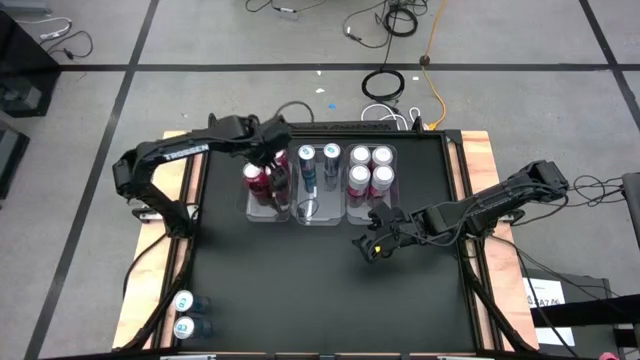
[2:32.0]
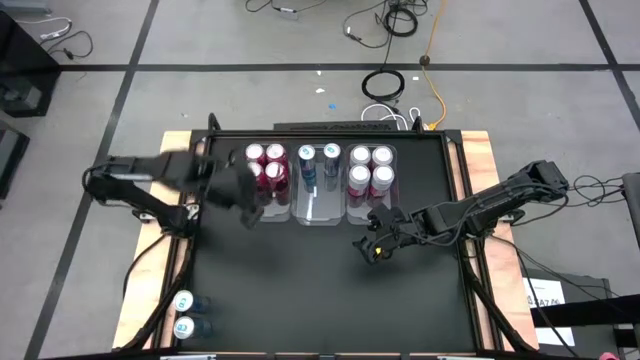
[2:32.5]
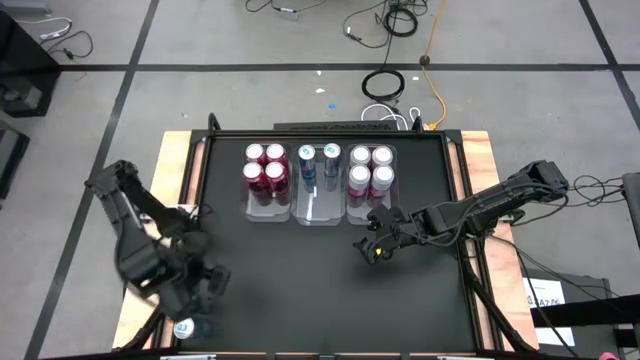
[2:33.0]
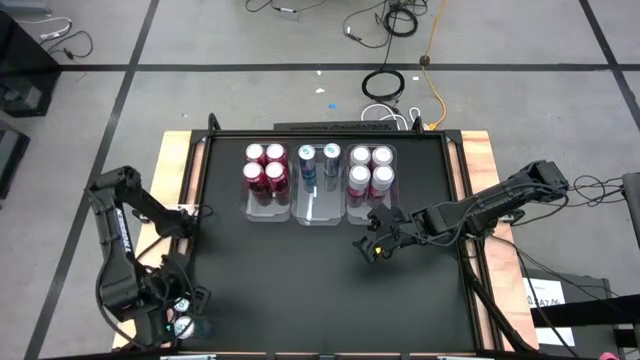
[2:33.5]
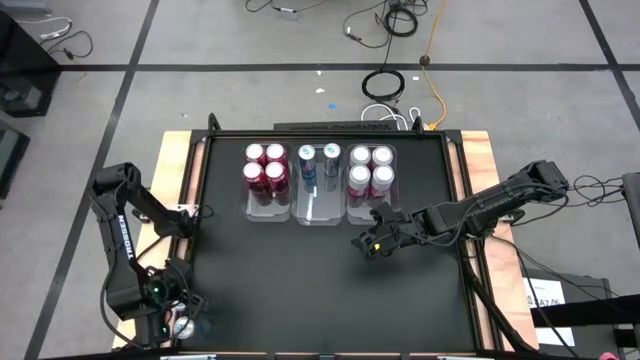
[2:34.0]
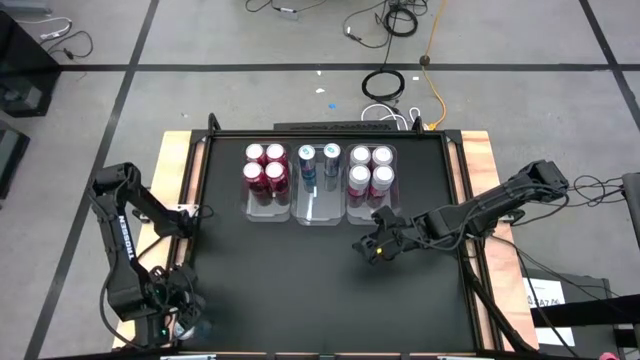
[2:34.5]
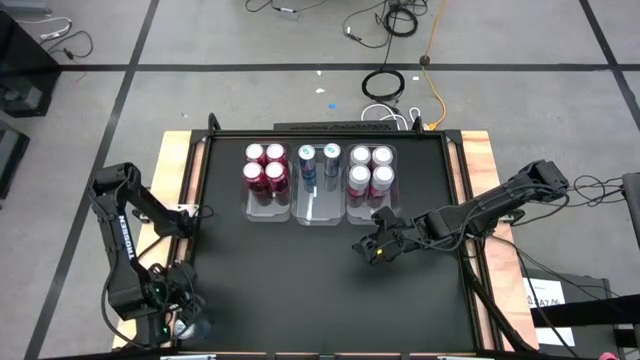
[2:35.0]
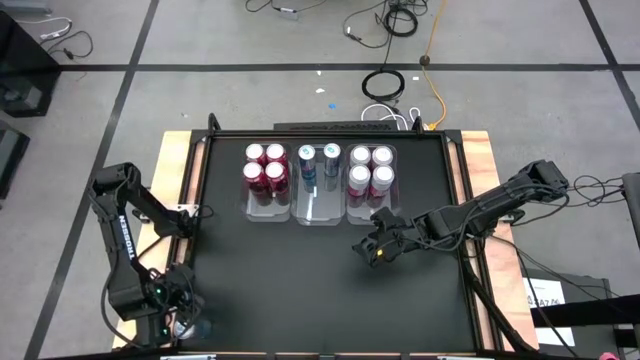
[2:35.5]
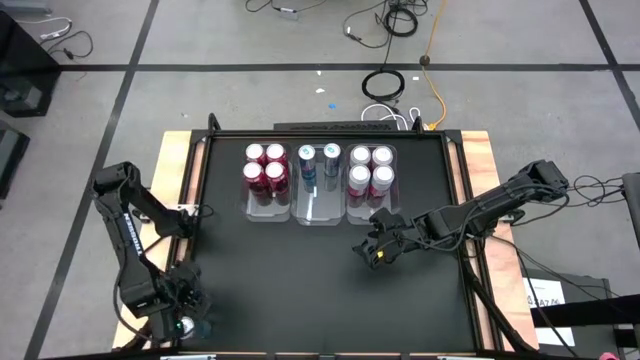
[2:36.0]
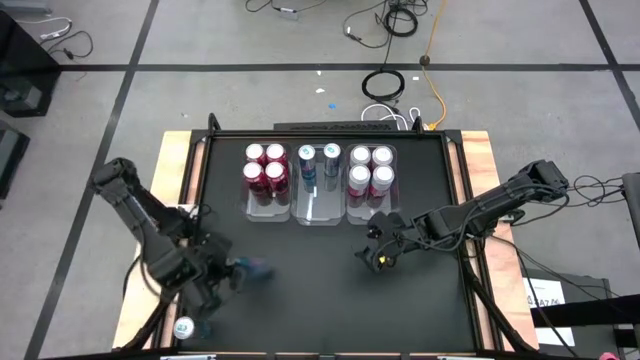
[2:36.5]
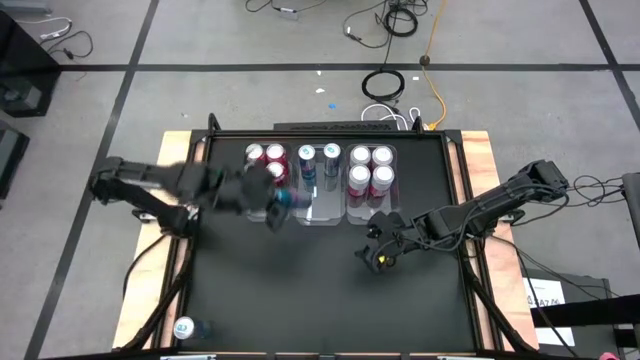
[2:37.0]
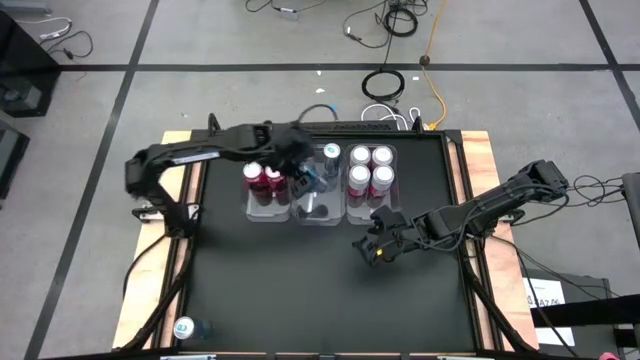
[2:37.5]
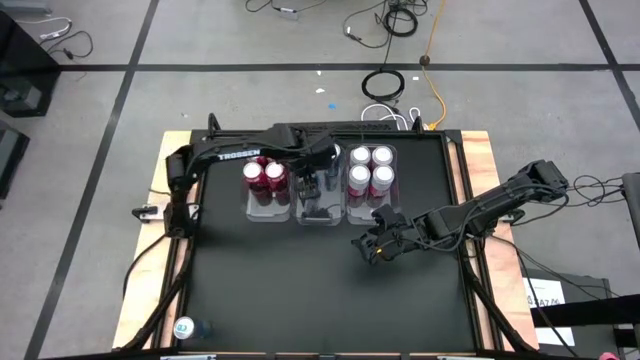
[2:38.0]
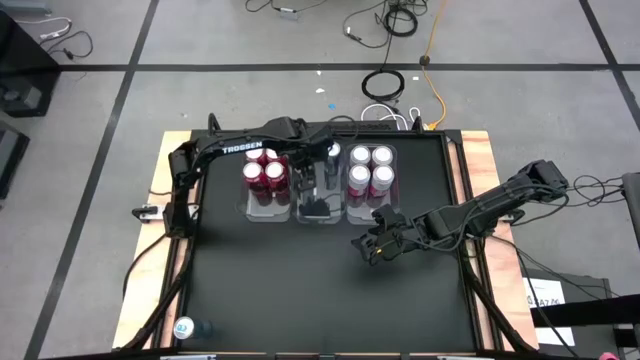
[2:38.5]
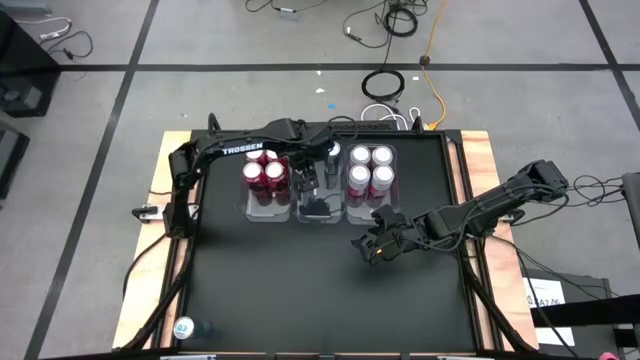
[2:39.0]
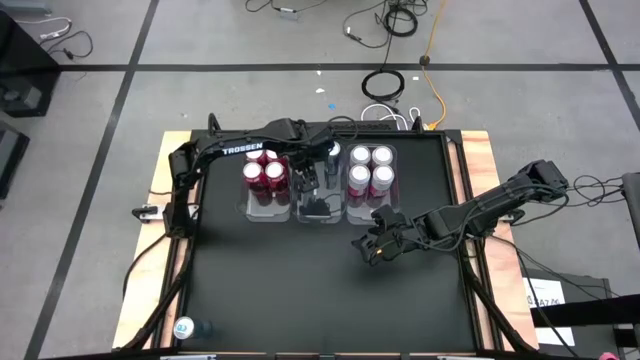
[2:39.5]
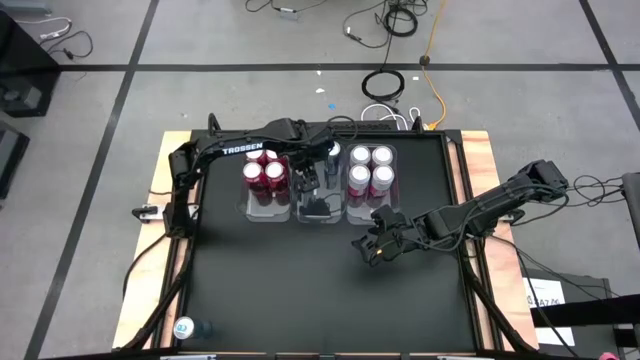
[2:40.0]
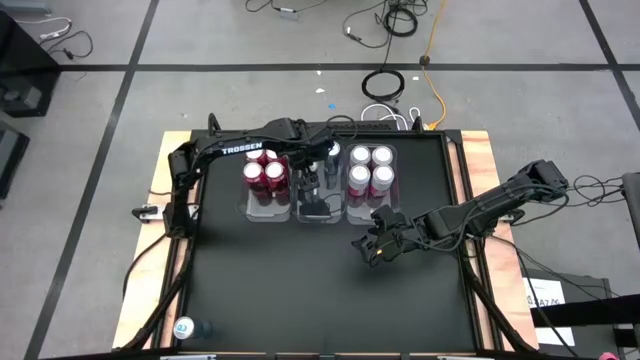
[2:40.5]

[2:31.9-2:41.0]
Task: Sort soda cans
Put the blue soda can into the center transparent bin

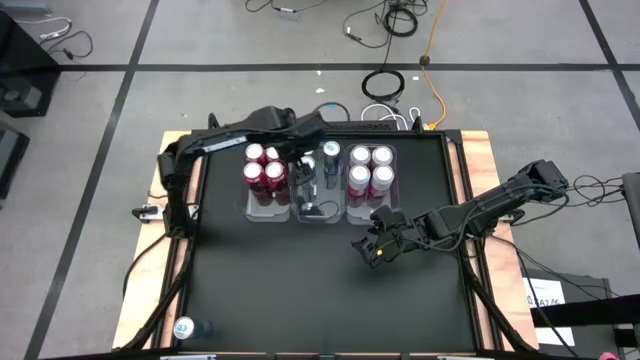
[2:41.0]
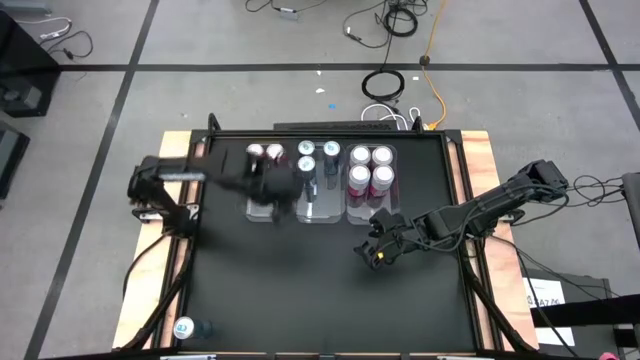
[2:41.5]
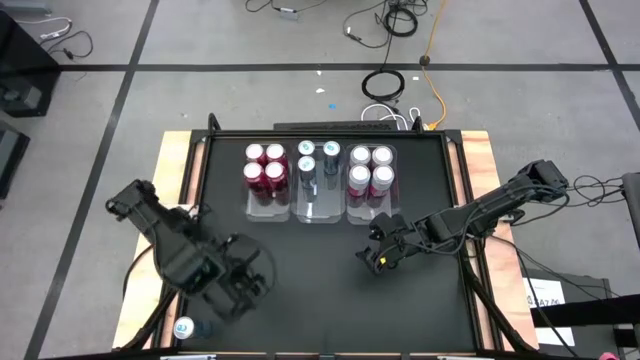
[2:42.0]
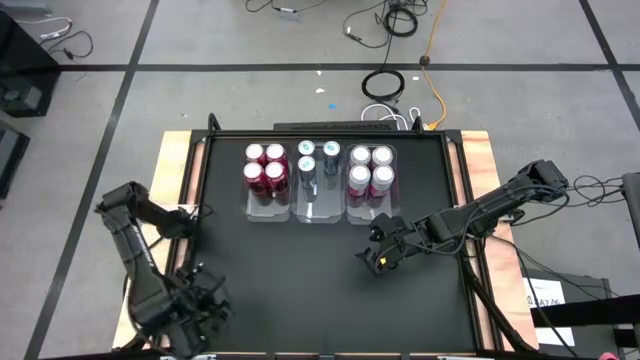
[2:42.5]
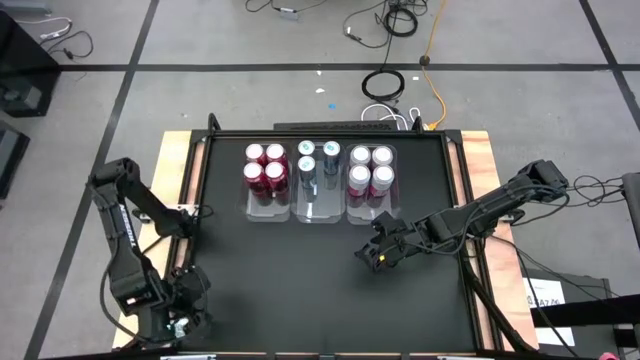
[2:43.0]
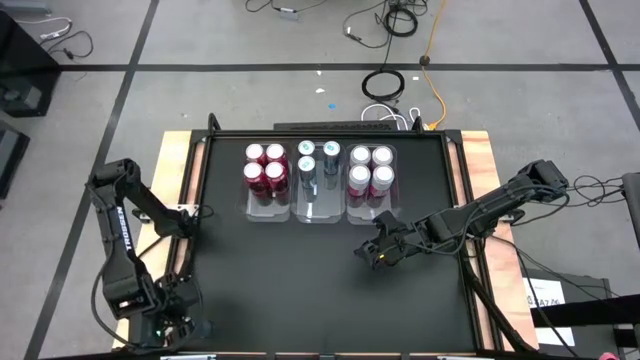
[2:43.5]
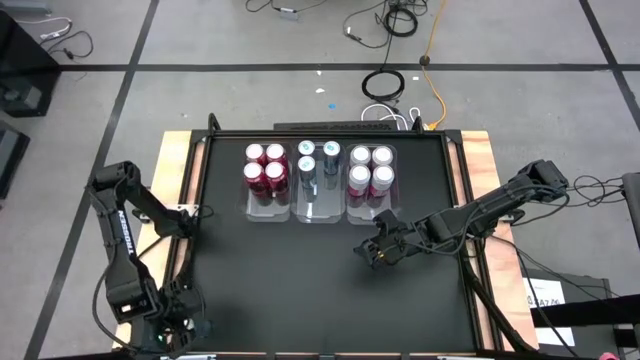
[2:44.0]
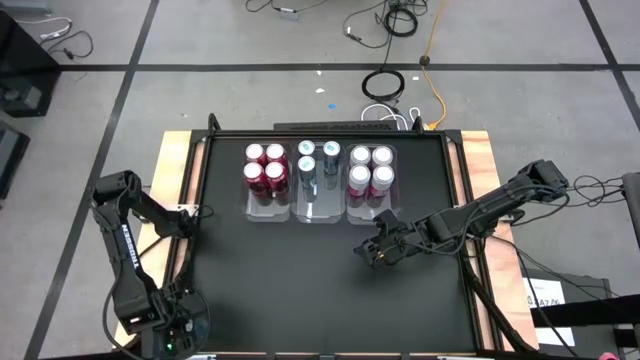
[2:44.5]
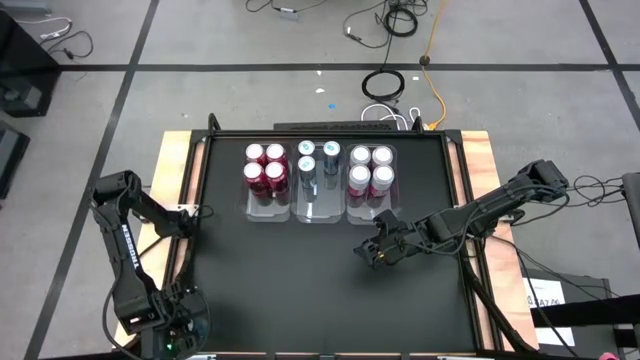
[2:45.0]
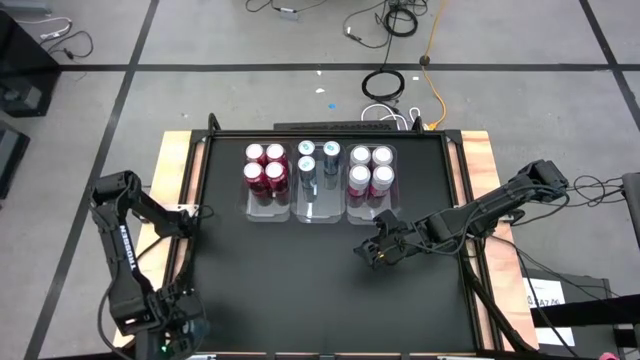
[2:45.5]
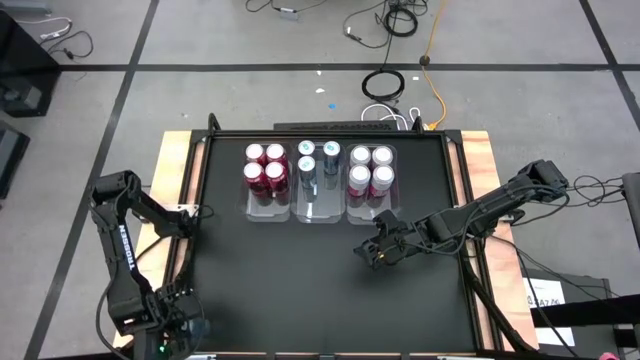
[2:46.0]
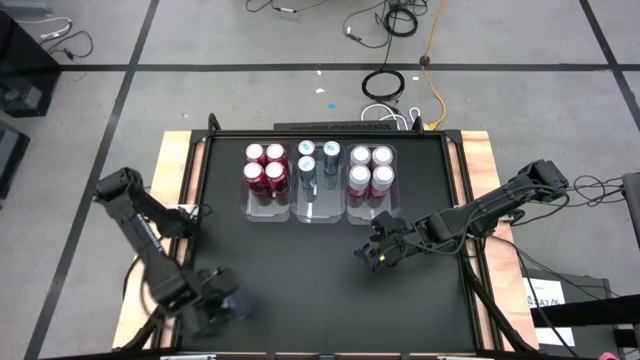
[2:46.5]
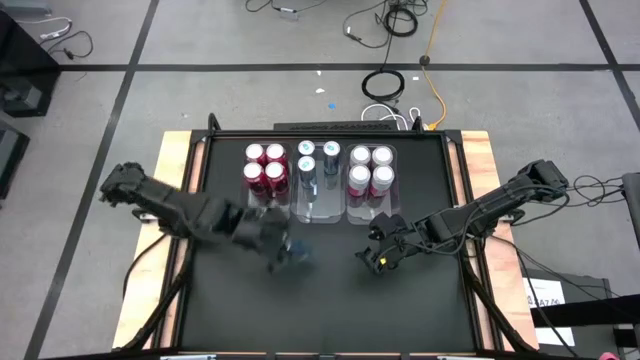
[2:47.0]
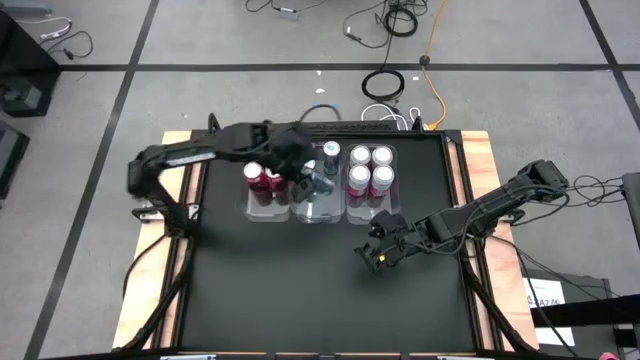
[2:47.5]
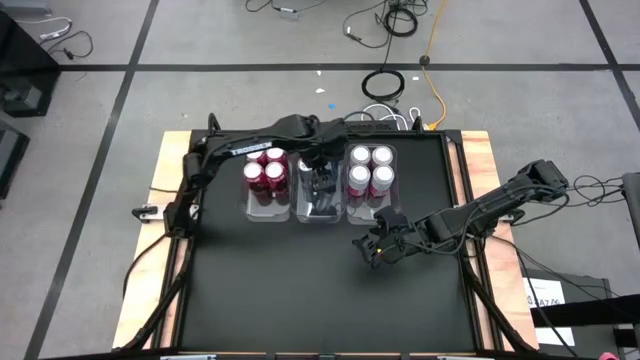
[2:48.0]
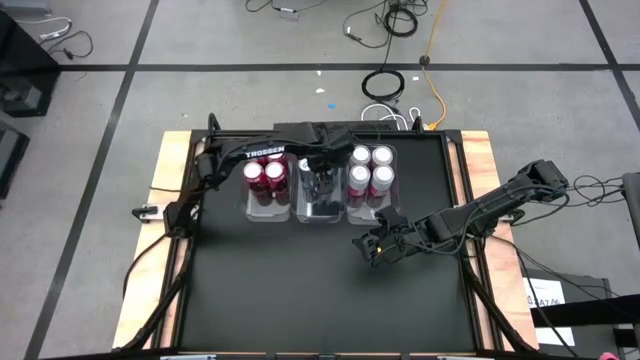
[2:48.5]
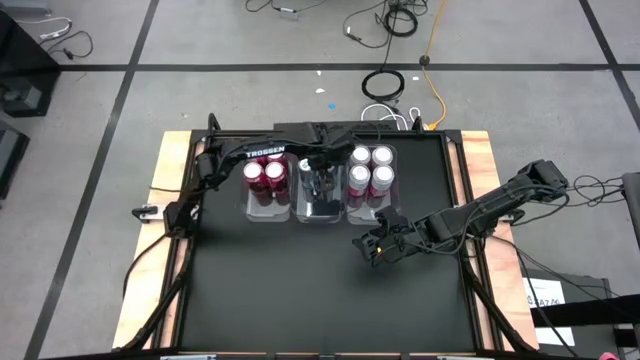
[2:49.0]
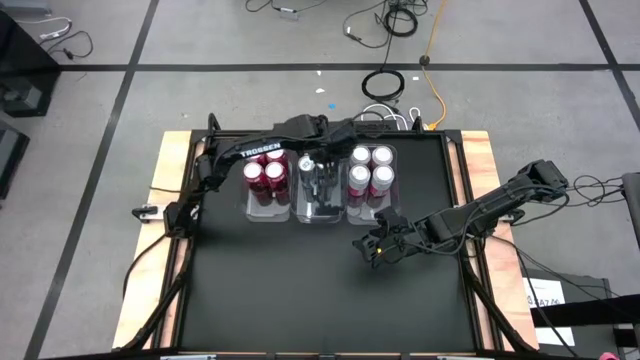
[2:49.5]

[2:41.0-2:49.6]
Put the blue soda can into the center transparent bin

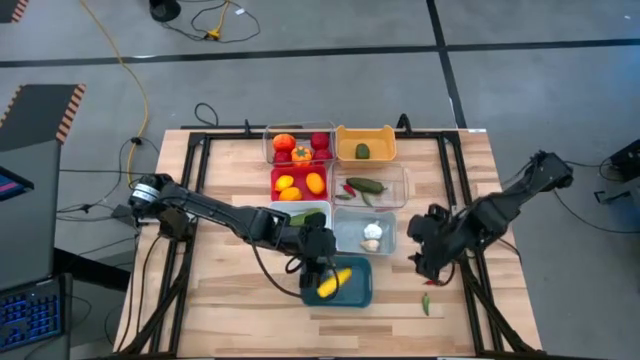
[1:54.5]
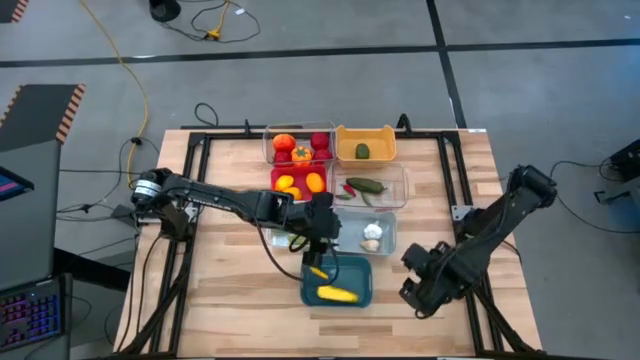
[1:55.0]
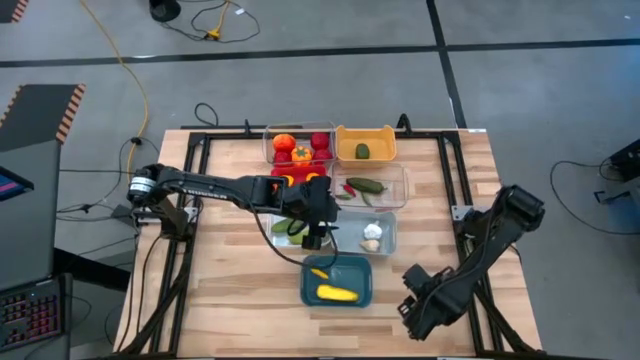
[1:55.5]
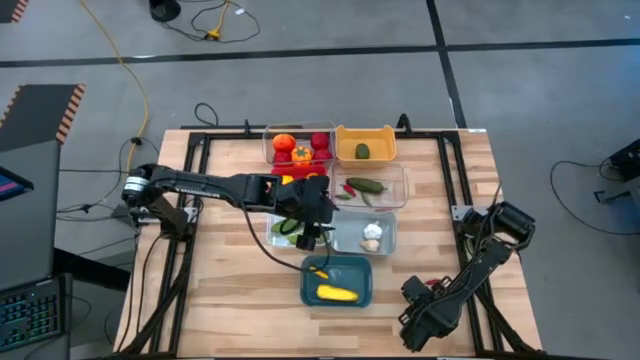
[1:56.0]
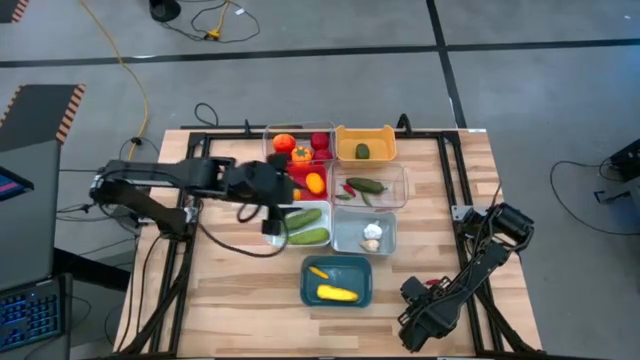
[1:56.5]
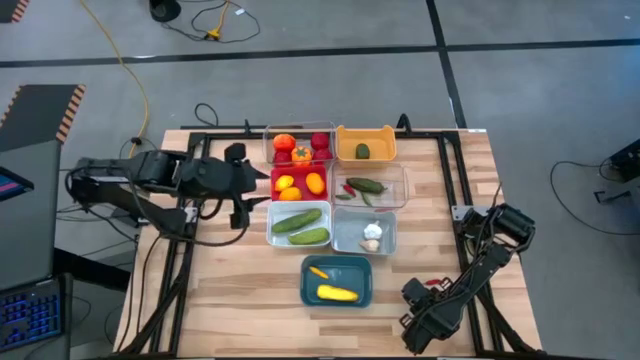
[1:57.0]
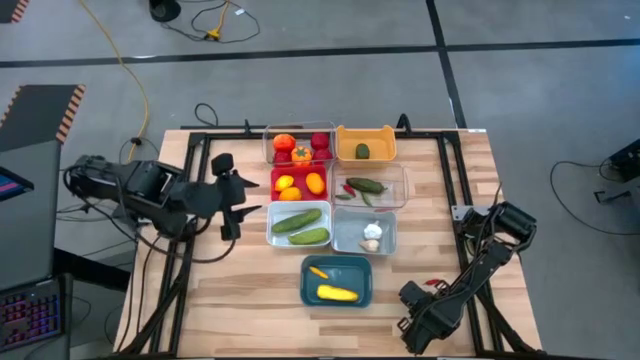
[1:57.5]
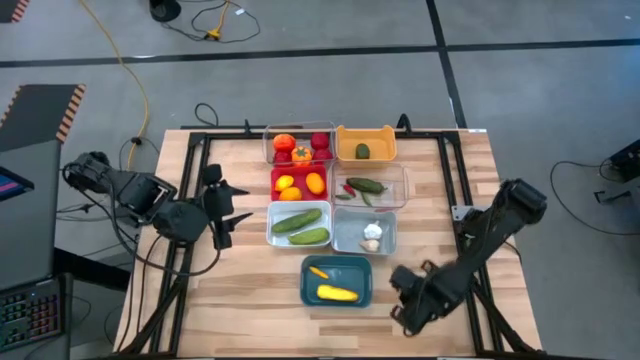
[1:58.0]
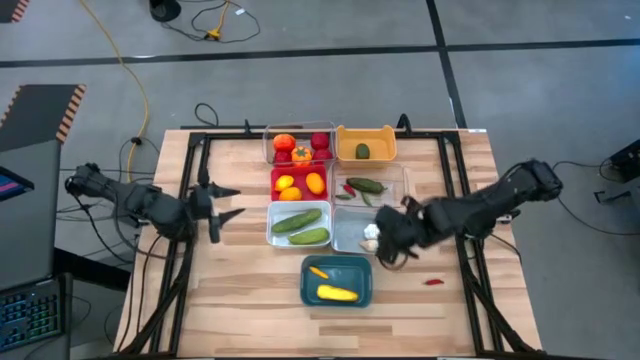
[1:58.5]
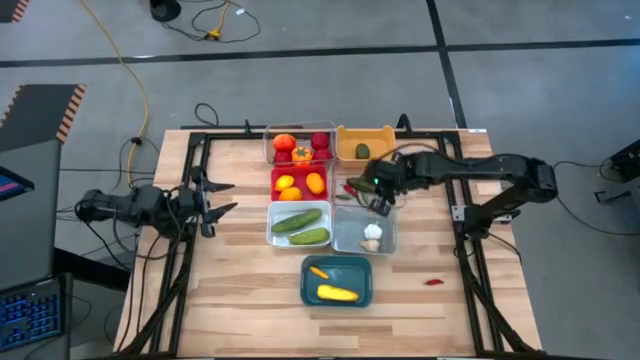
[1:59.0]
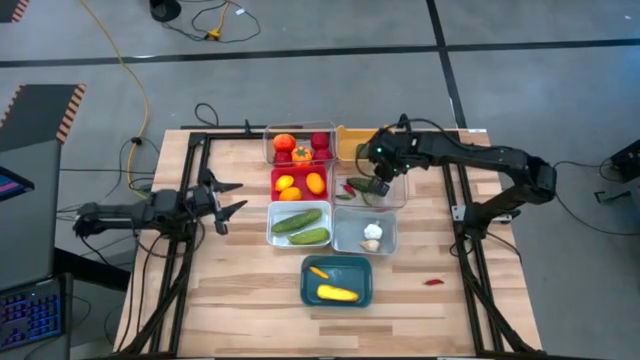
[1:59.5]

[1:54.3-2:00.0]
Task: Sort produce into baskets
Put the green chili pepper into the bottom transparent bin
